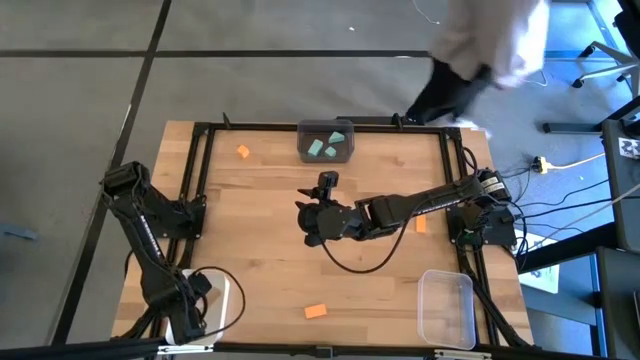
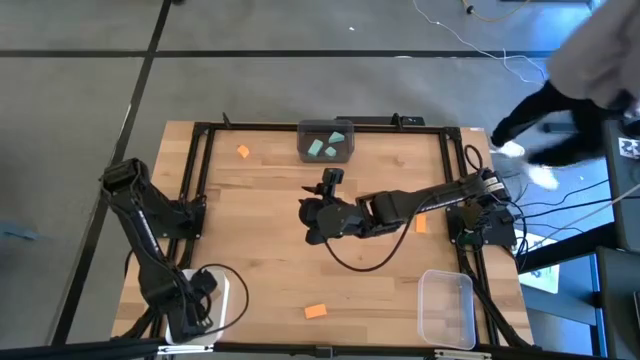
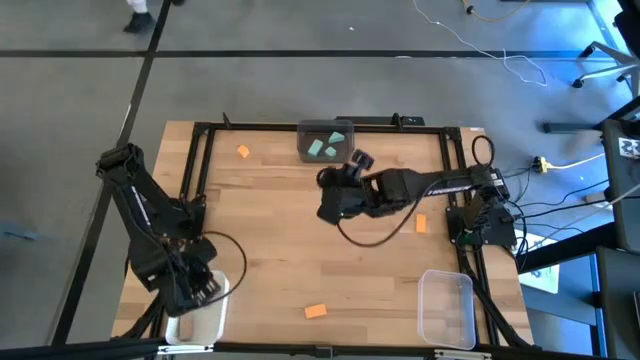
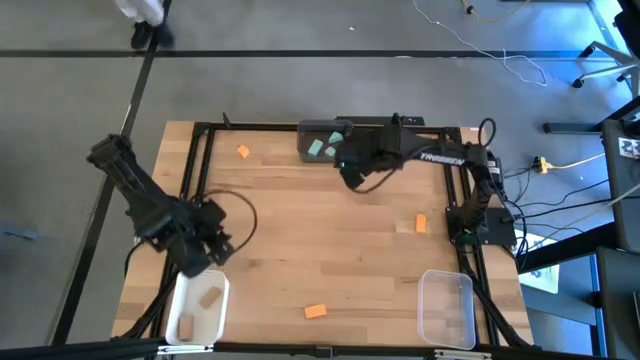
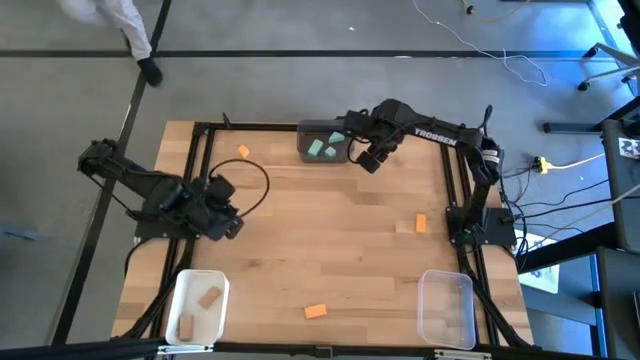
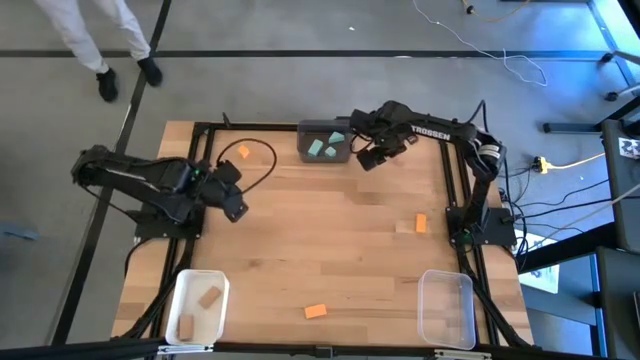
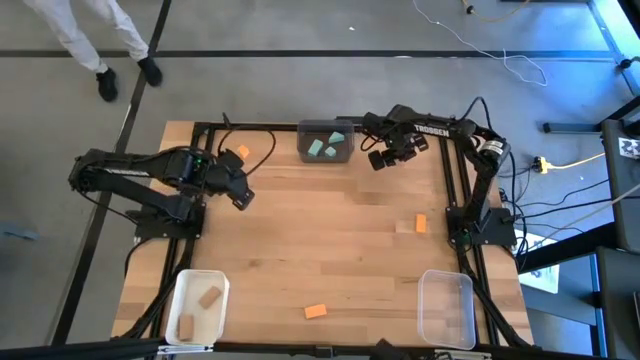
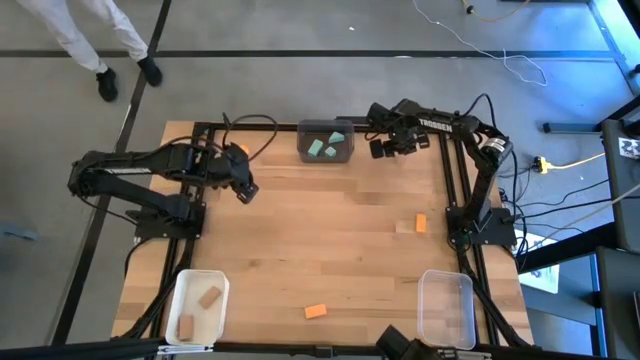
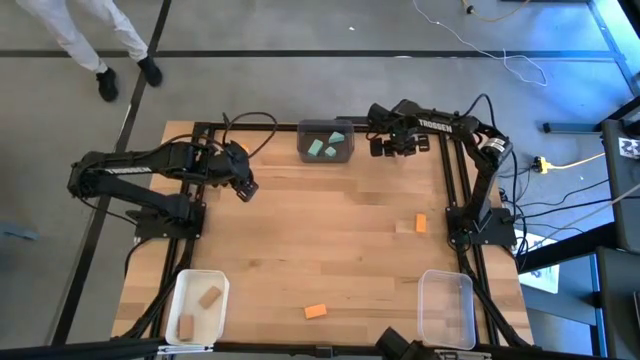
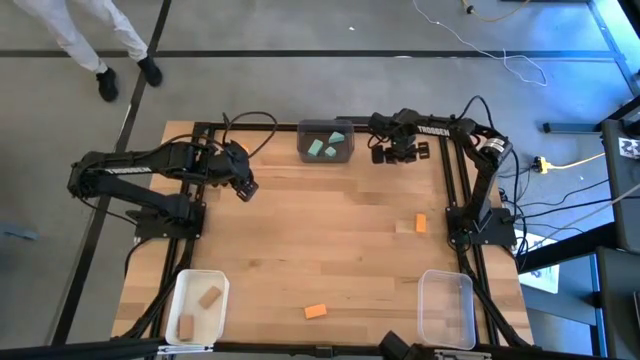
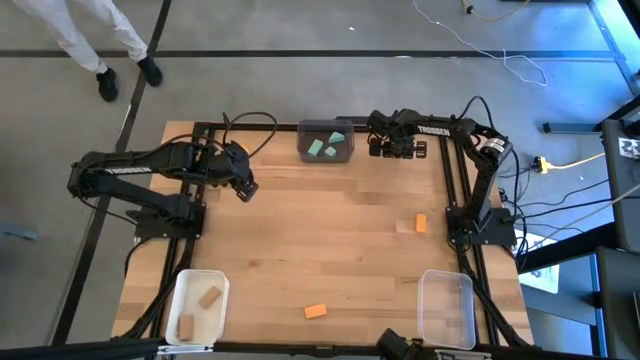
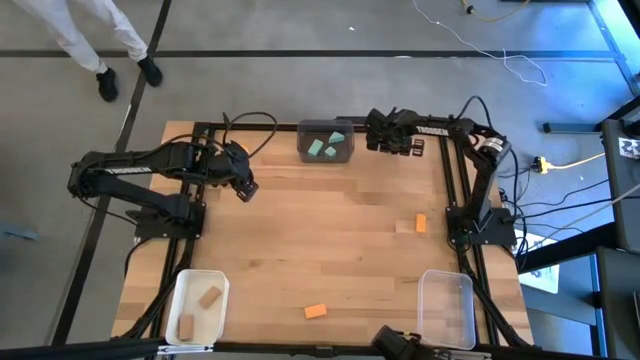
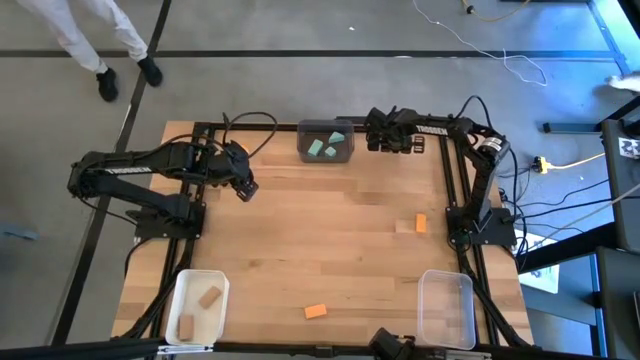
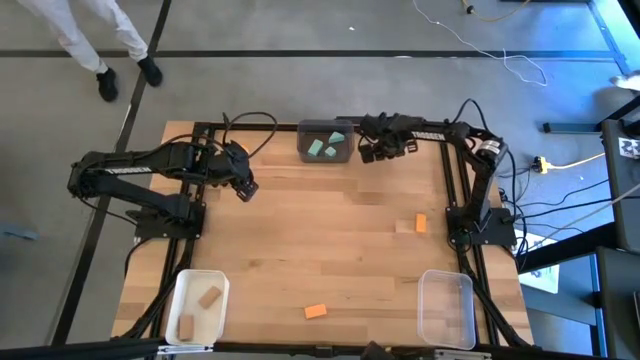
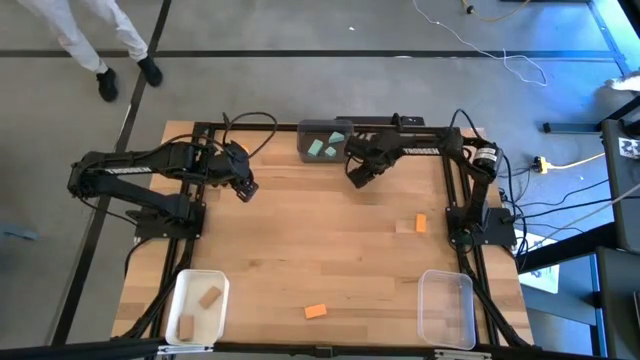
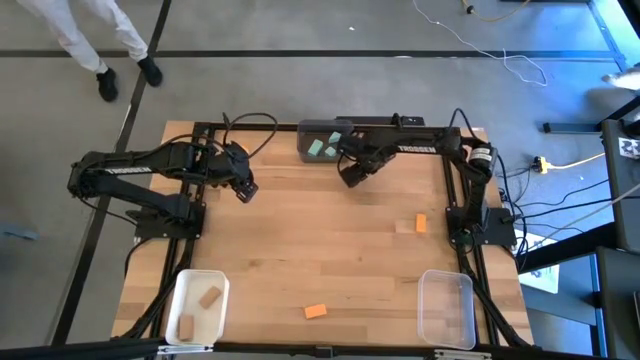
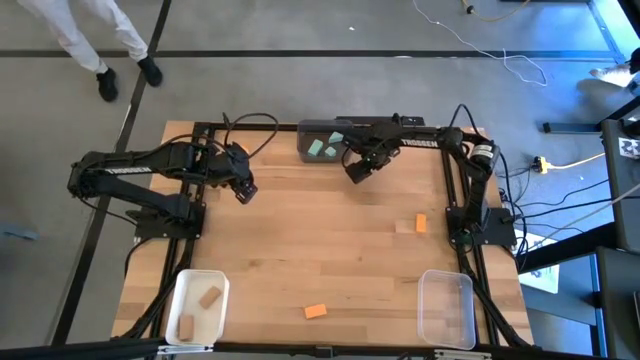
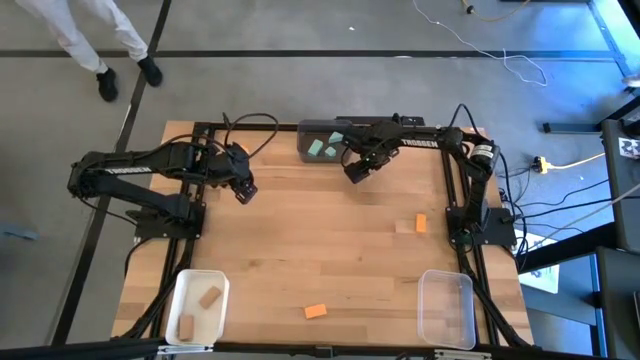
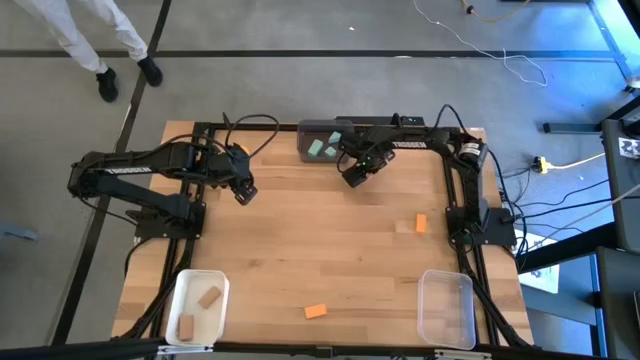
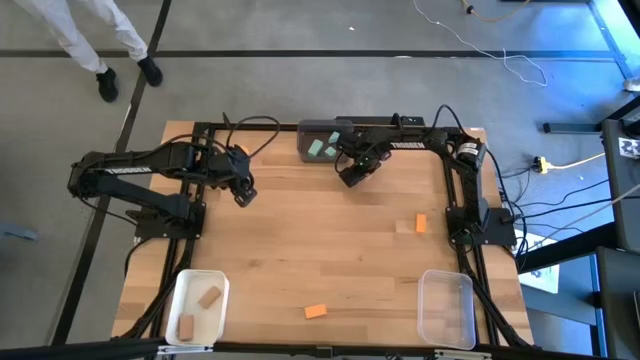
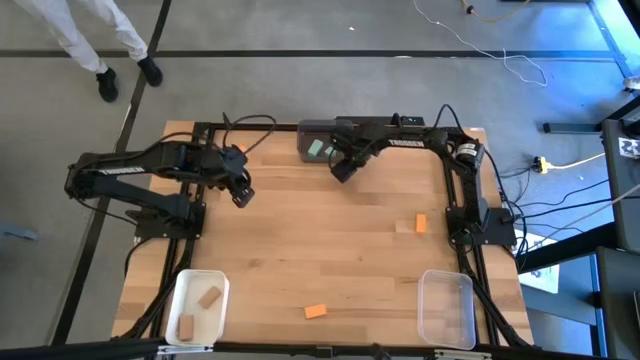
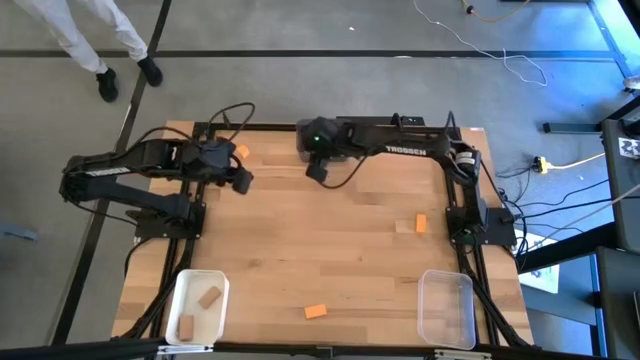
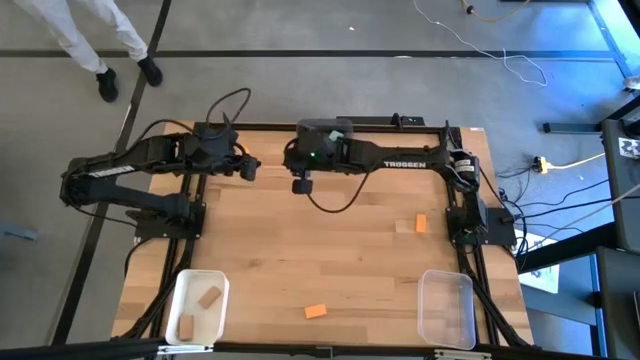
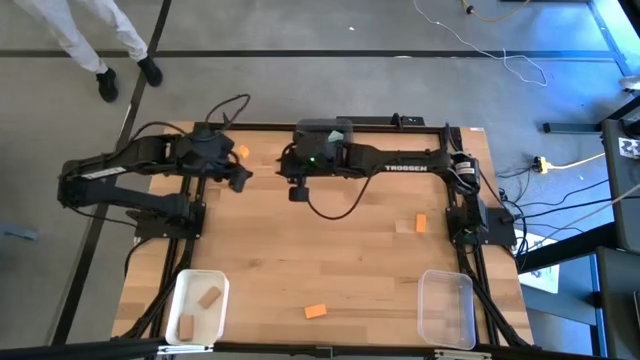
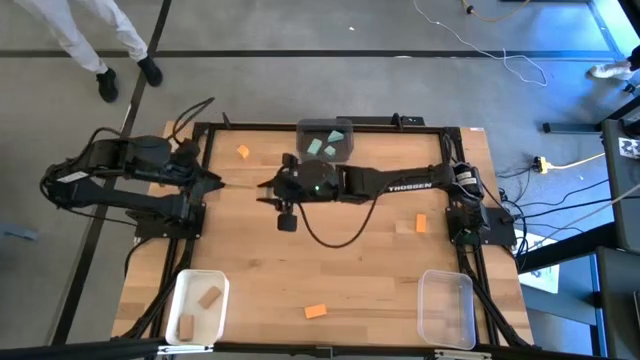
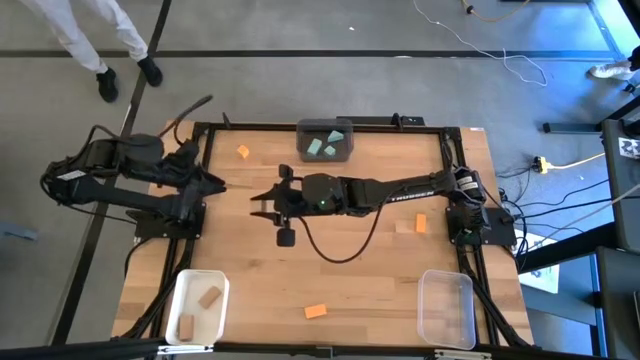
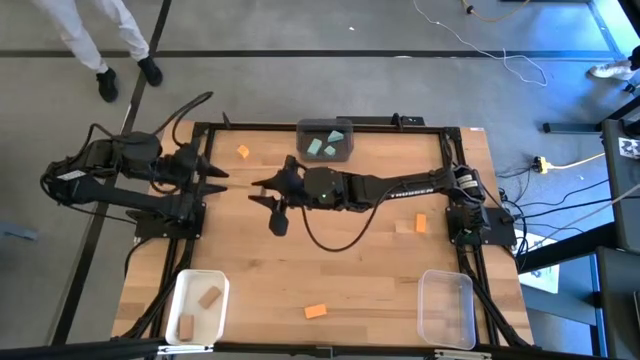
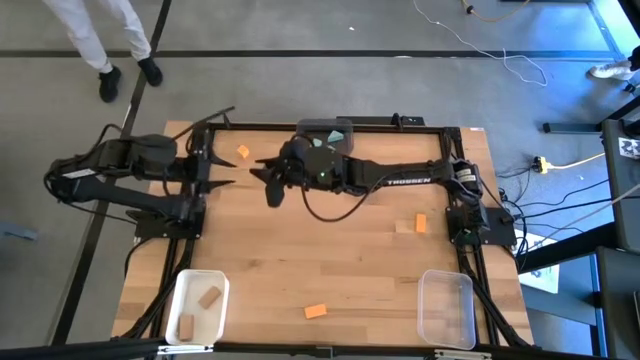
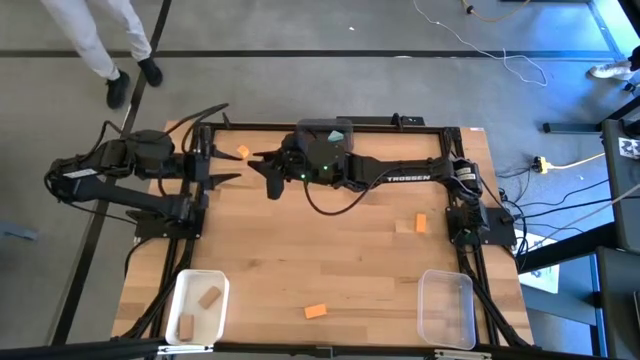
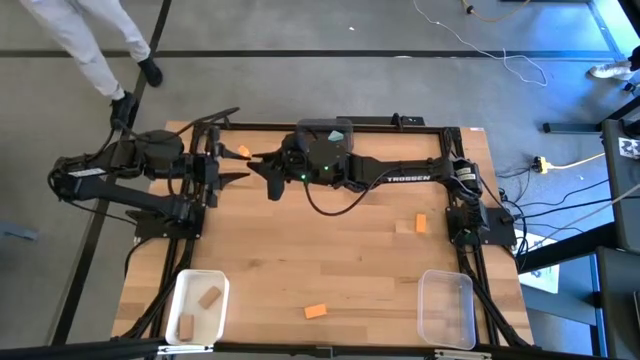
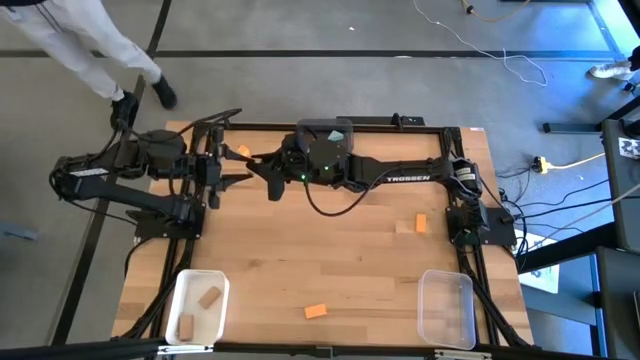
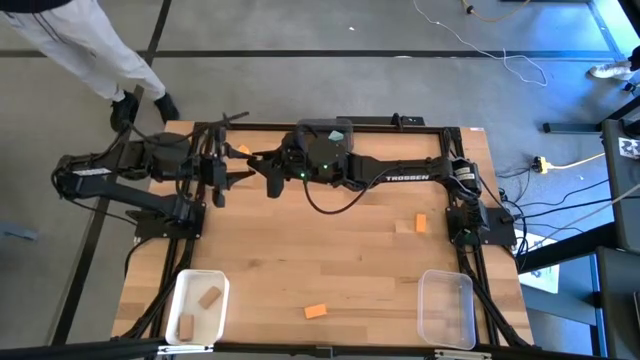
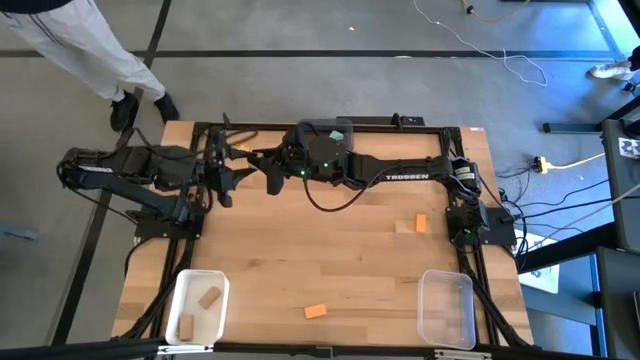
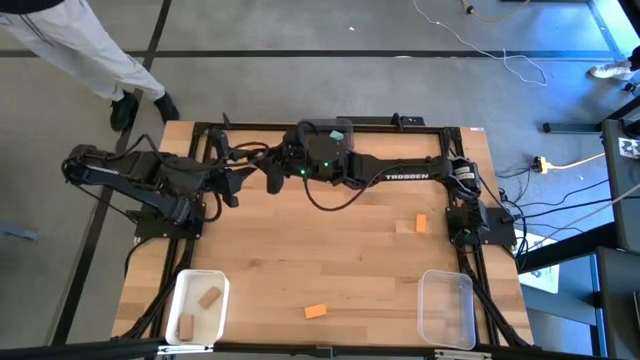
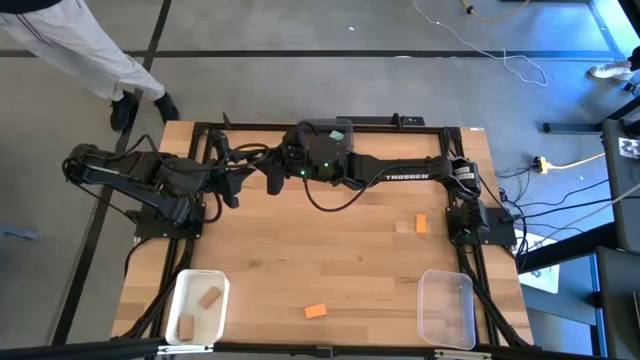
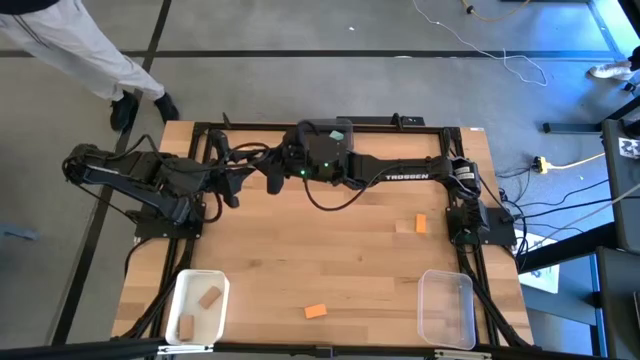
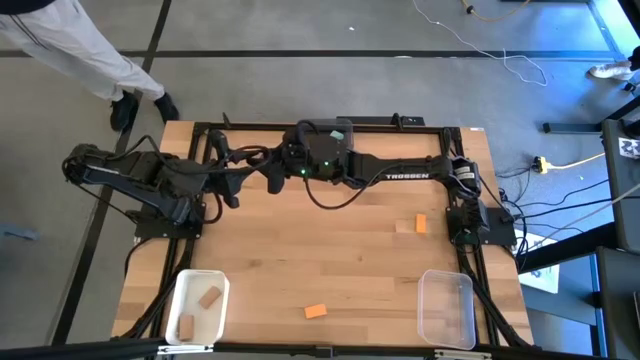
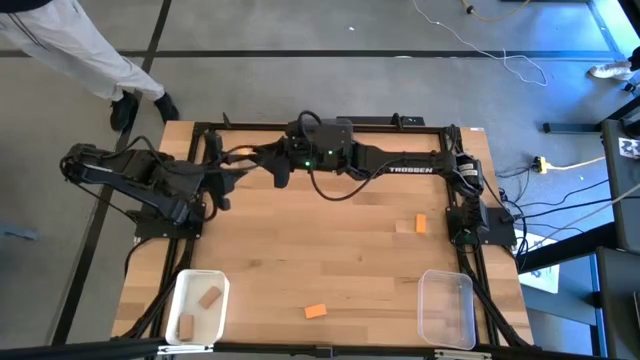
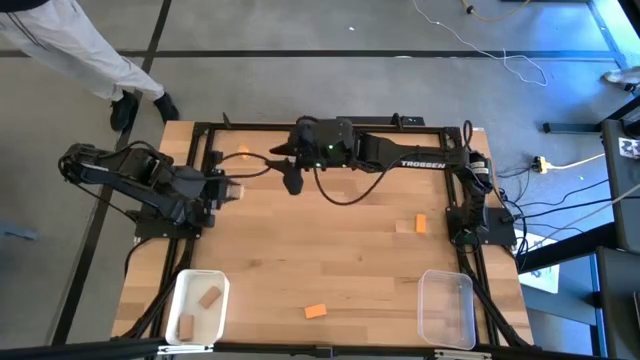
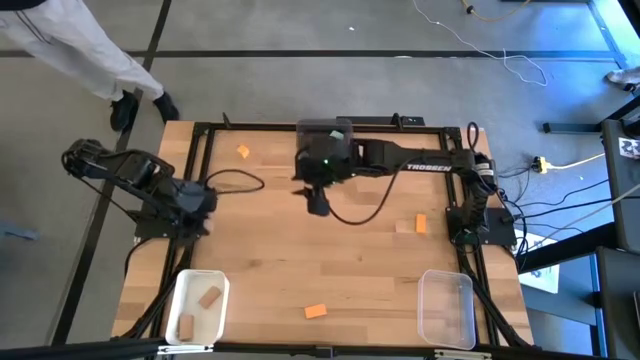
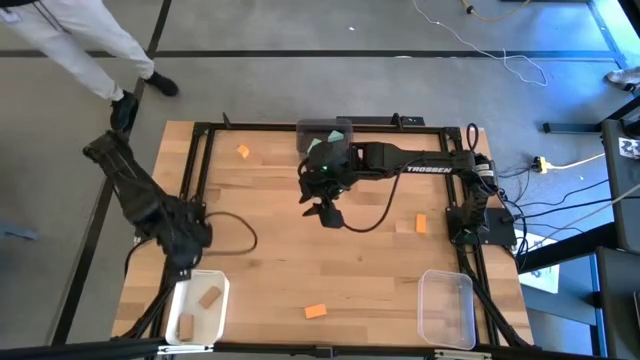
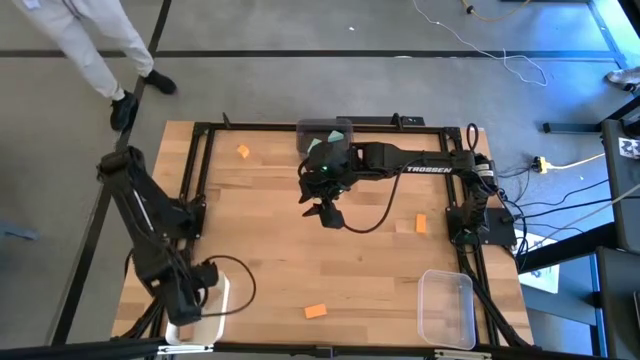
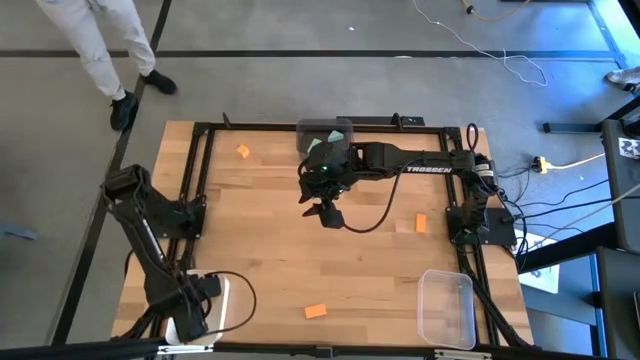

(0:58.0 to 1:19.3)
Task: Sort & place blocks by color
Put the brown block into the white bin
